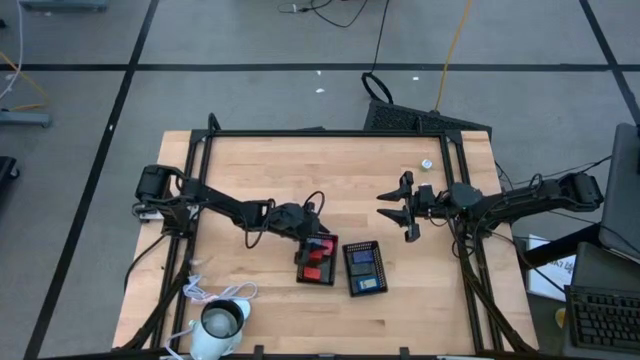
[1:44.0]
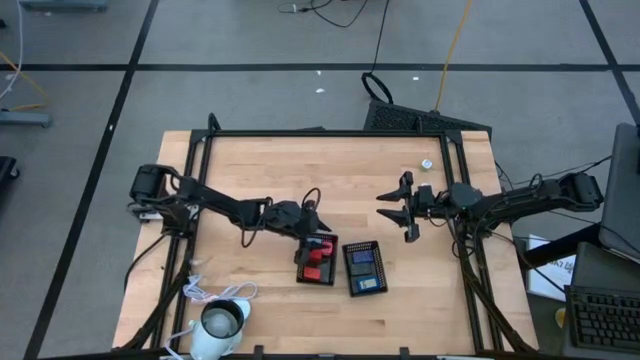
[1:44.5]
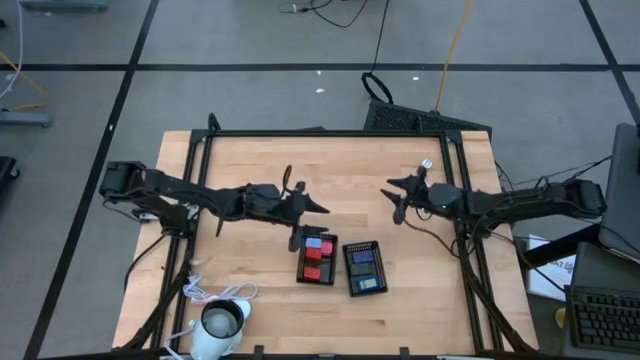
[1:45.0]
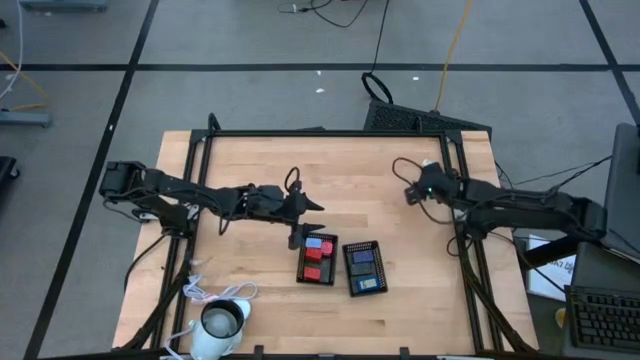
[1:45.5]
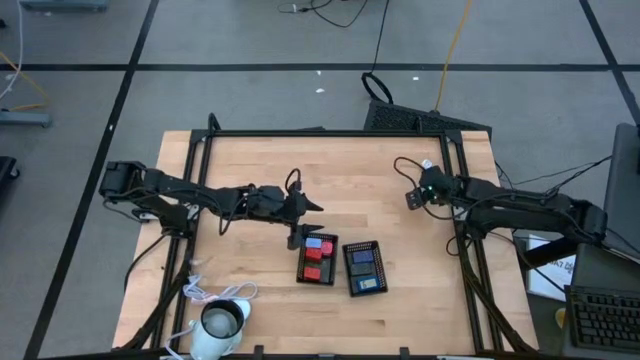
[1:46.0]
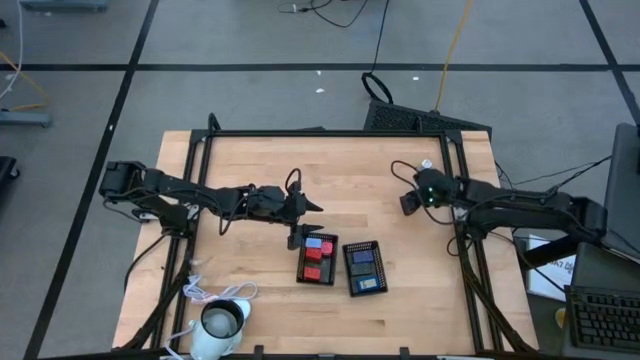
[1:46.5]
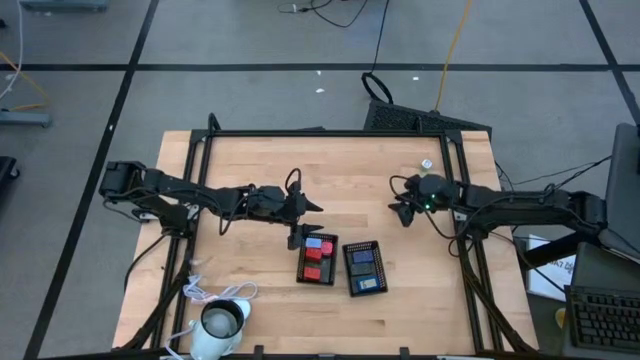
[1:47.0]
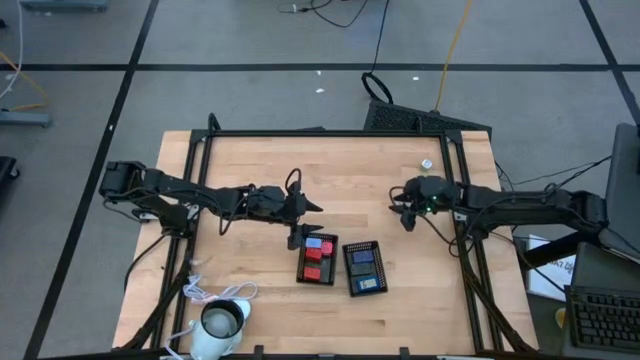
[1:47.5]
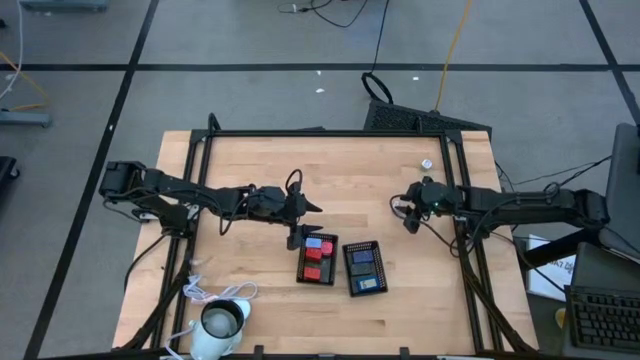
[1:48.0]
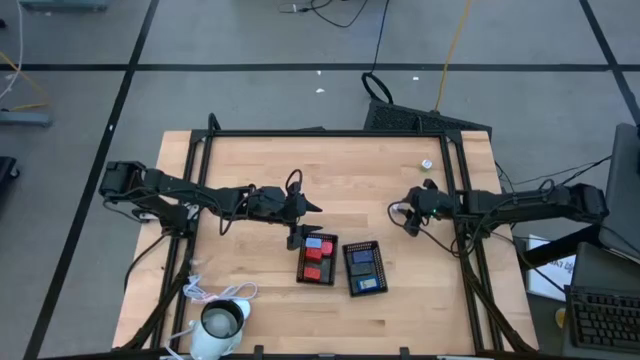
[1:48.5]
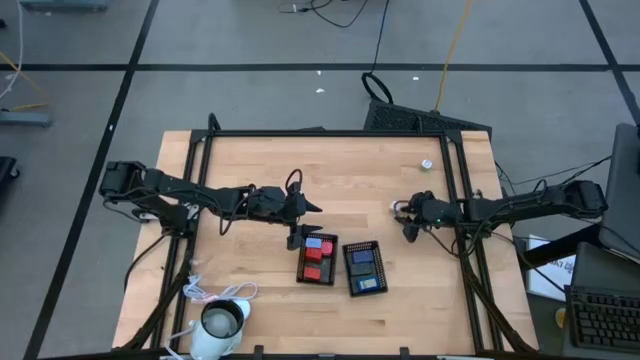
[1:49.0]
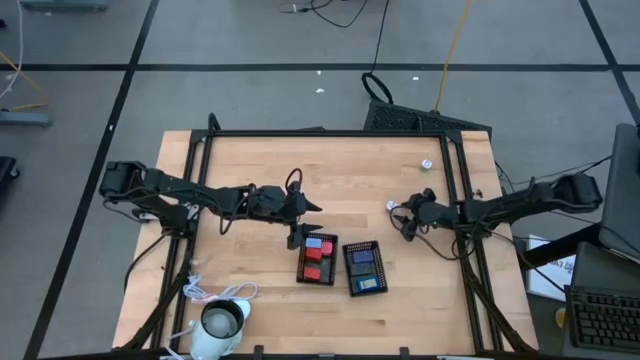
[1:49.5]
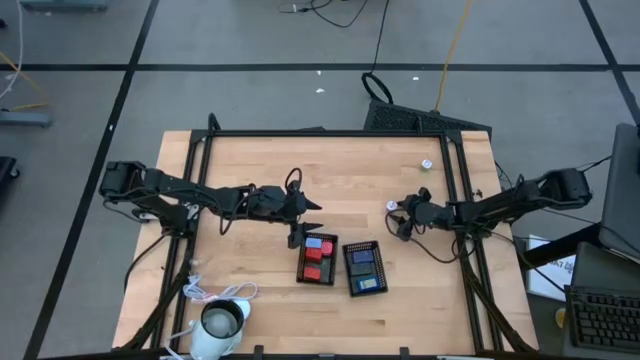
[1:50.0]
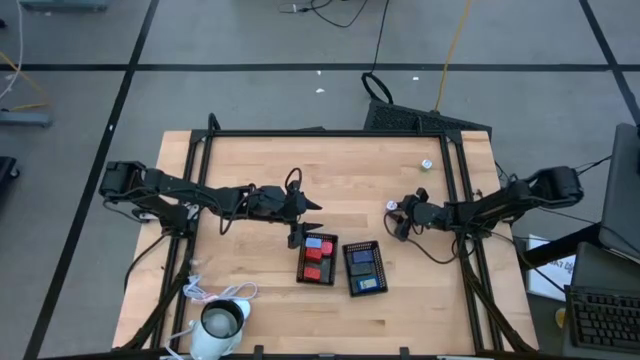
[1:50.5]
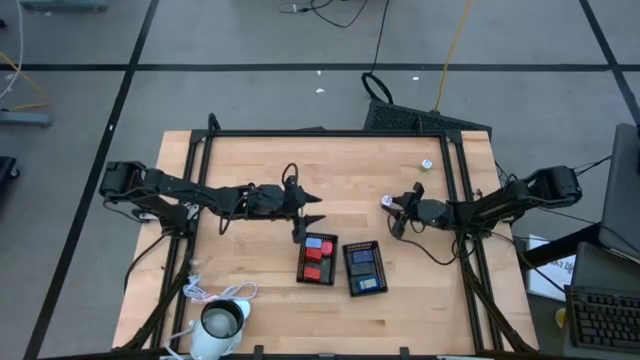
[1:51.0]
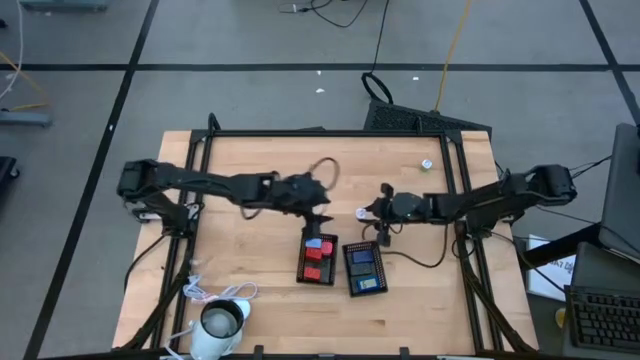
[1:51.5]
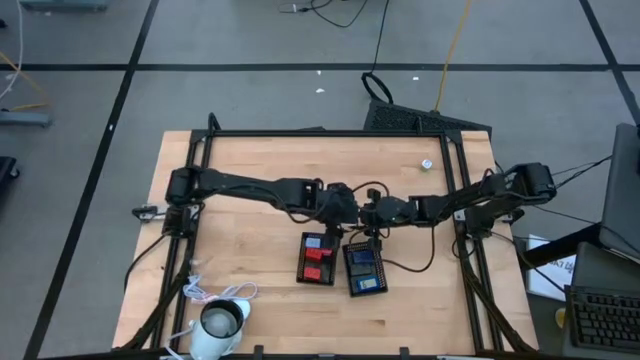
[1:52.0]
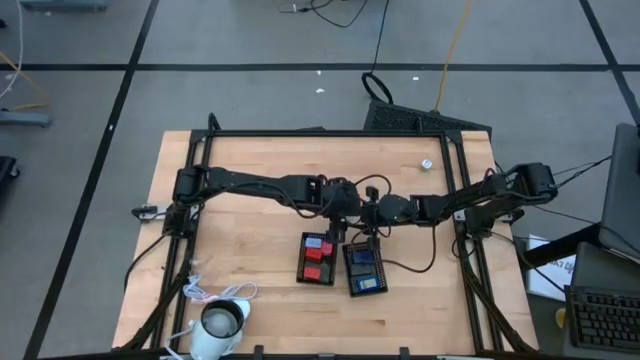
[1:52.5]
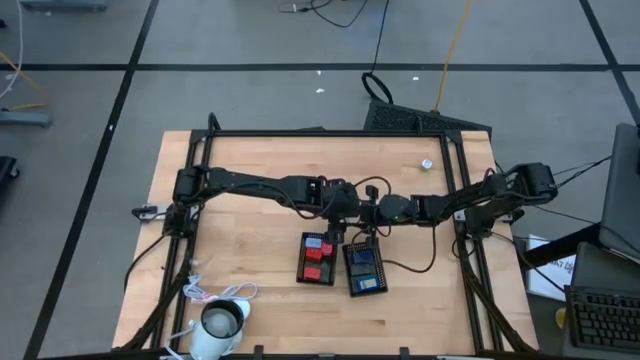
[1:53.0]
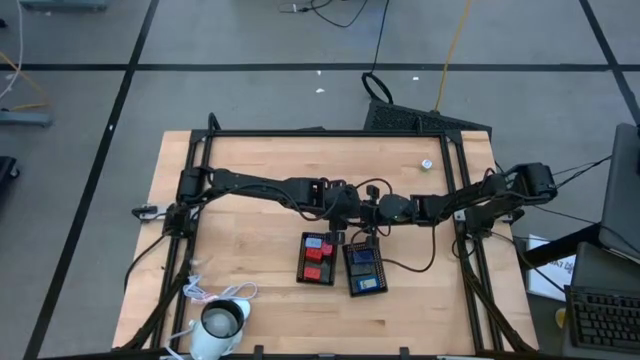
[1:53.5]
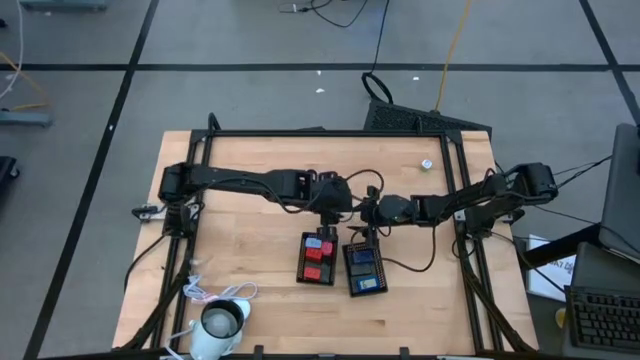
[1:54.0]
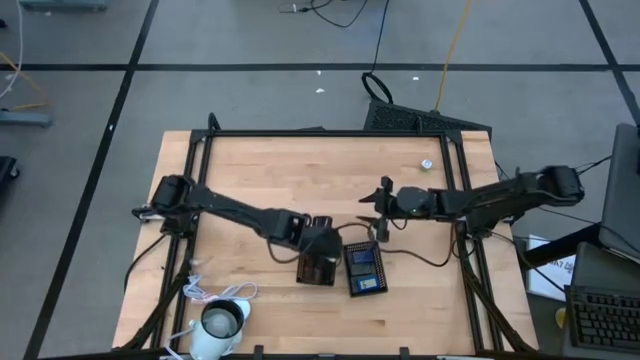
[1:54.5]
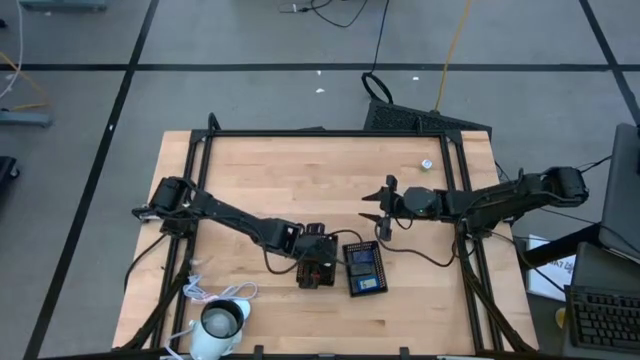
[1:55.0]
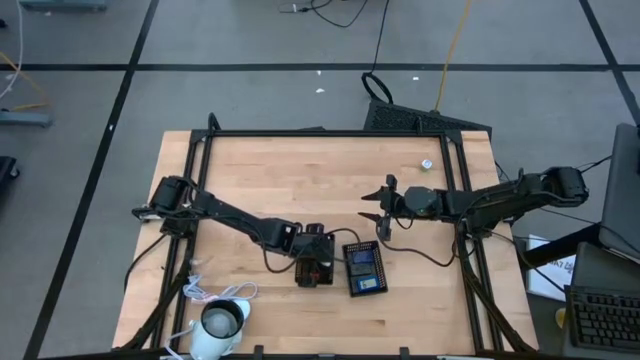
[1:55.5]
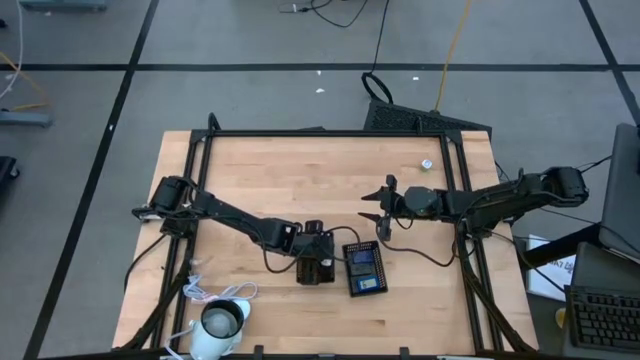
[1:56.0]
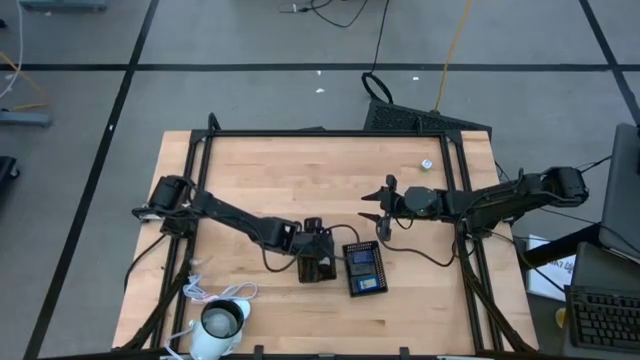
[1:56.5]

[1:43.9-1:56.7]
Task: Pick & Place Office items
Put the violet charger adapter into the left black basket
